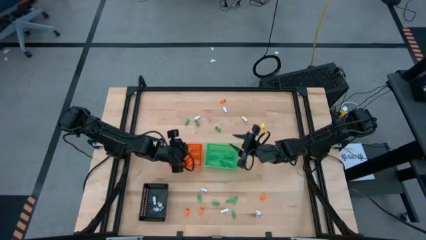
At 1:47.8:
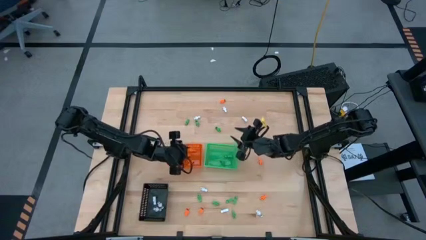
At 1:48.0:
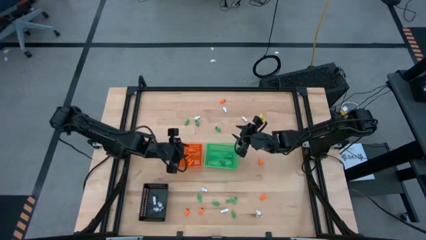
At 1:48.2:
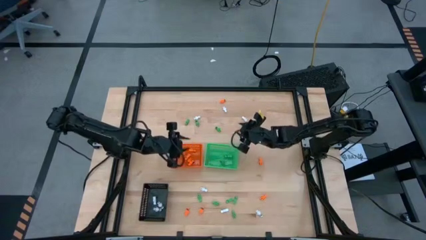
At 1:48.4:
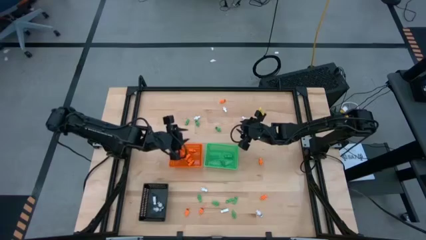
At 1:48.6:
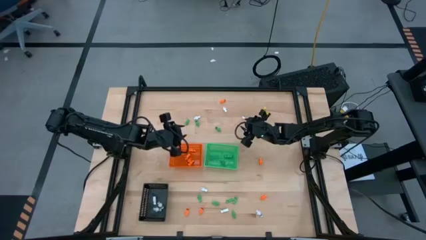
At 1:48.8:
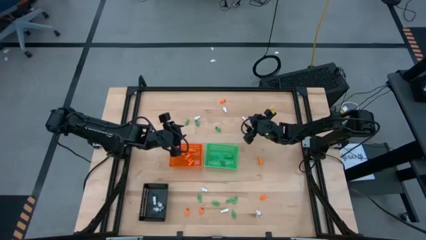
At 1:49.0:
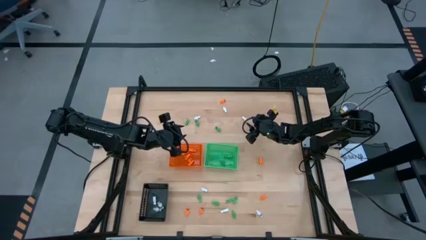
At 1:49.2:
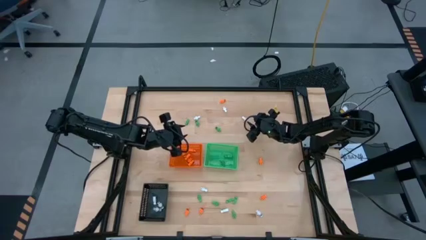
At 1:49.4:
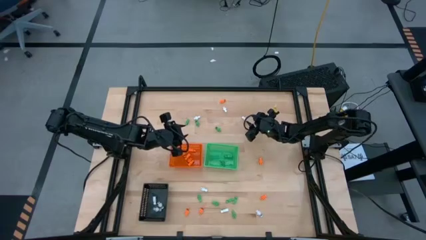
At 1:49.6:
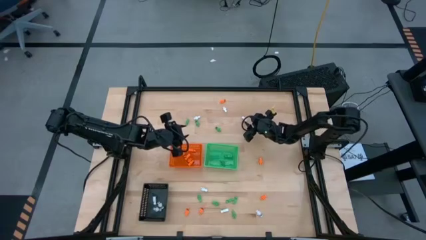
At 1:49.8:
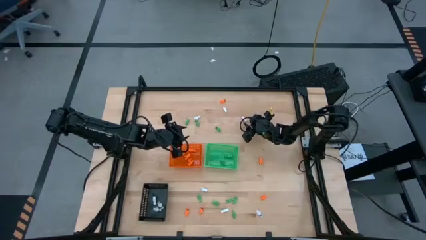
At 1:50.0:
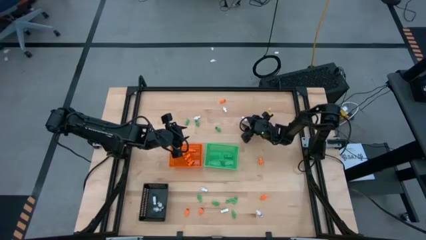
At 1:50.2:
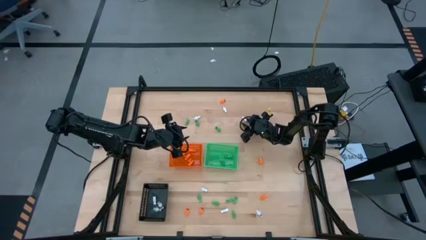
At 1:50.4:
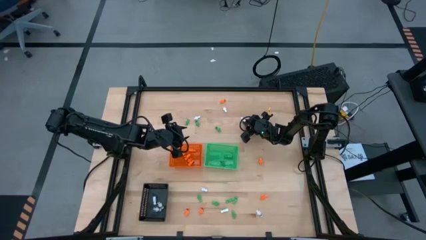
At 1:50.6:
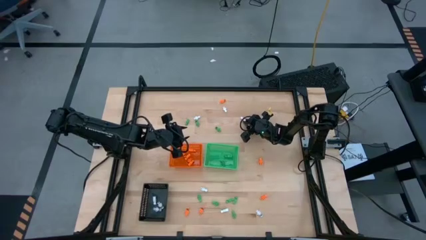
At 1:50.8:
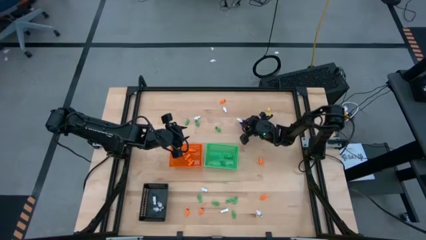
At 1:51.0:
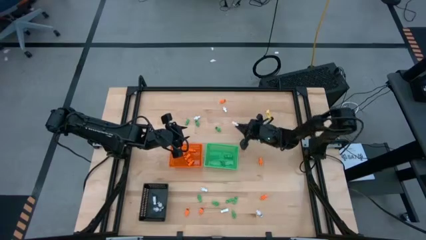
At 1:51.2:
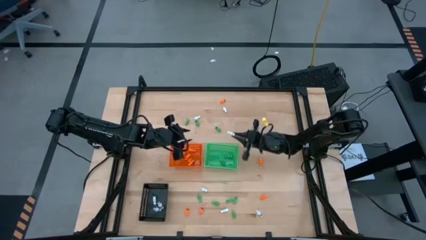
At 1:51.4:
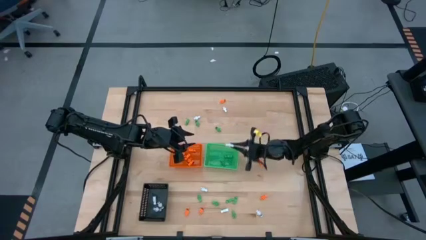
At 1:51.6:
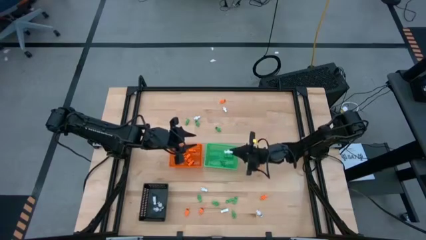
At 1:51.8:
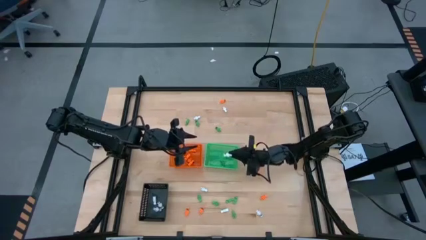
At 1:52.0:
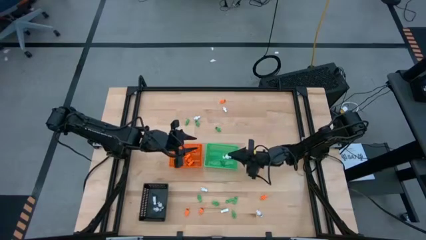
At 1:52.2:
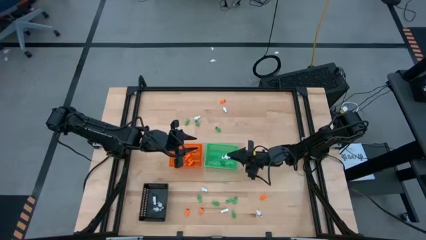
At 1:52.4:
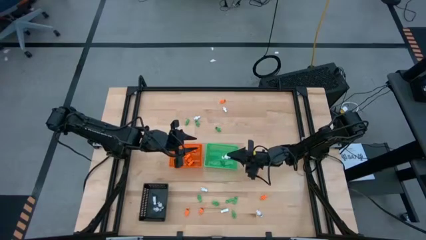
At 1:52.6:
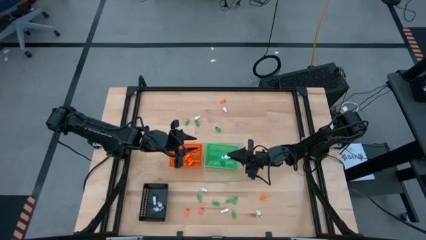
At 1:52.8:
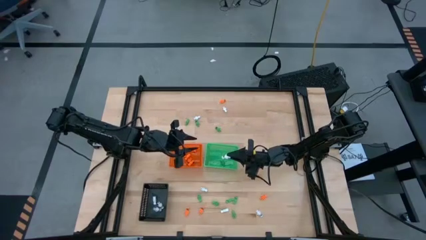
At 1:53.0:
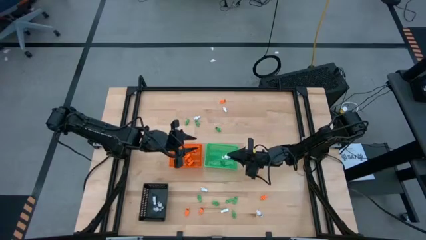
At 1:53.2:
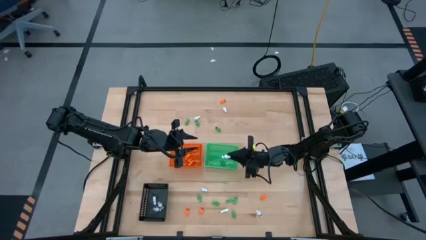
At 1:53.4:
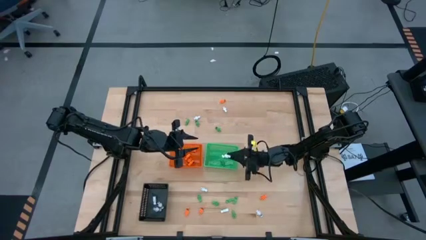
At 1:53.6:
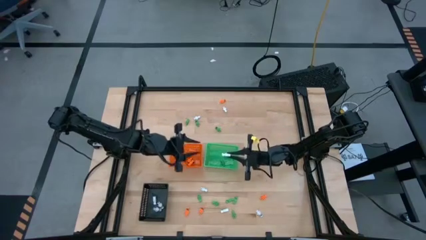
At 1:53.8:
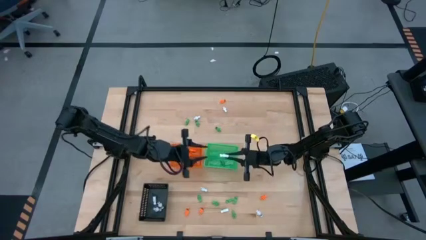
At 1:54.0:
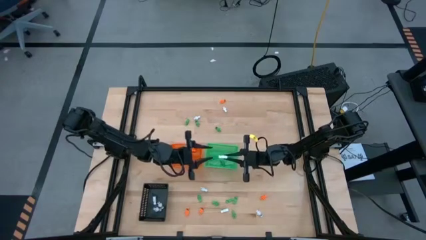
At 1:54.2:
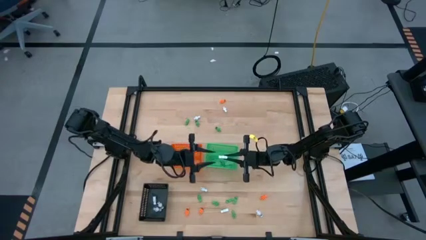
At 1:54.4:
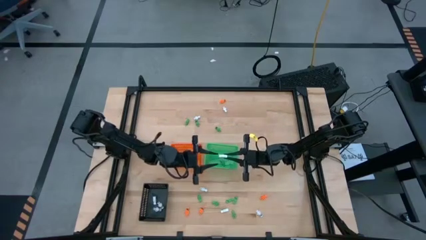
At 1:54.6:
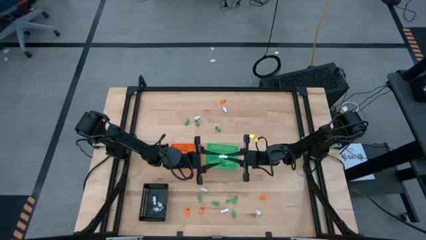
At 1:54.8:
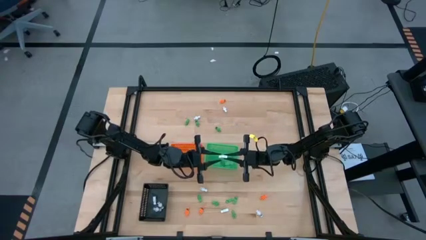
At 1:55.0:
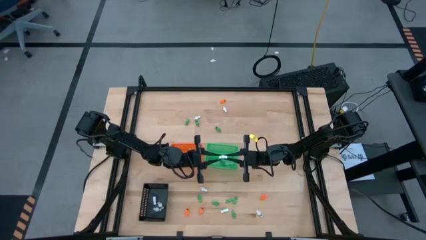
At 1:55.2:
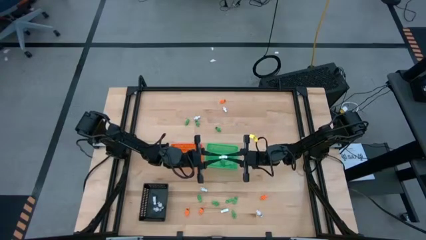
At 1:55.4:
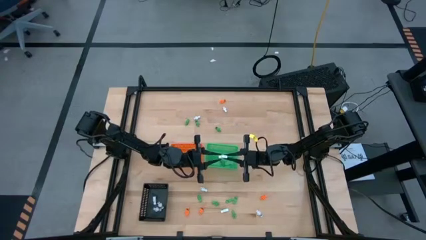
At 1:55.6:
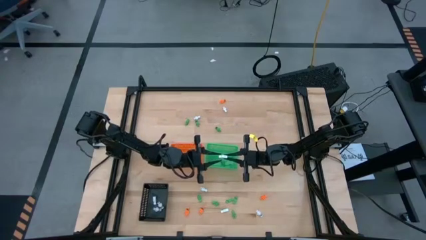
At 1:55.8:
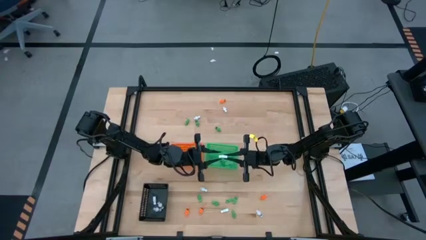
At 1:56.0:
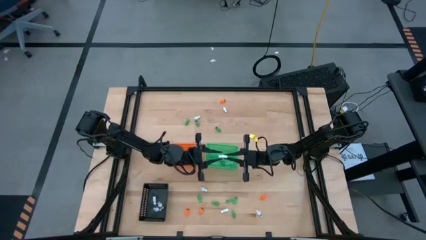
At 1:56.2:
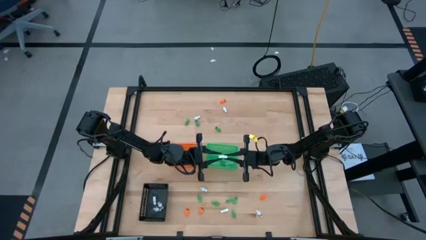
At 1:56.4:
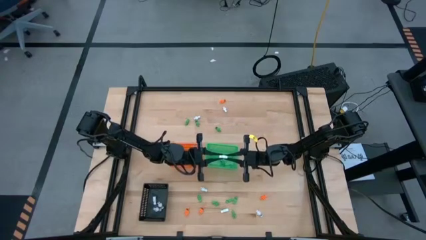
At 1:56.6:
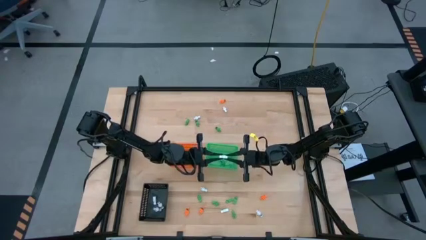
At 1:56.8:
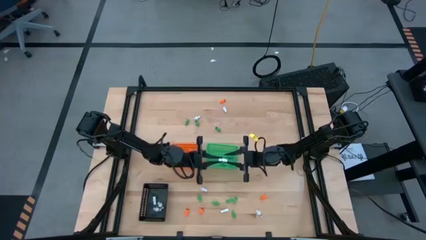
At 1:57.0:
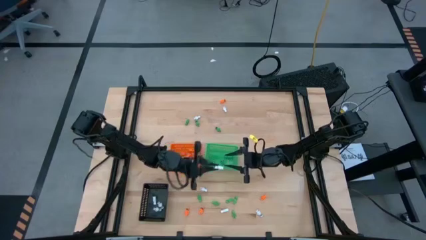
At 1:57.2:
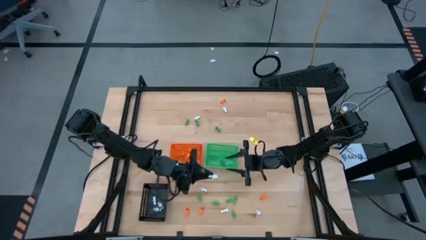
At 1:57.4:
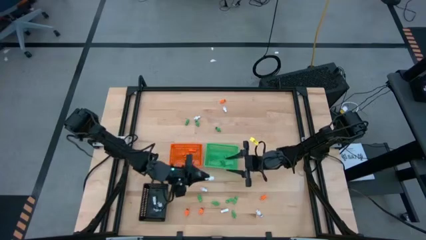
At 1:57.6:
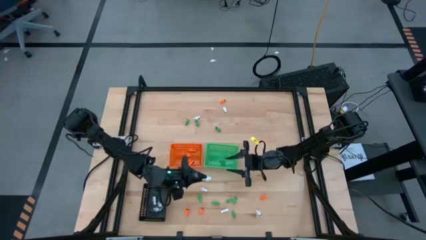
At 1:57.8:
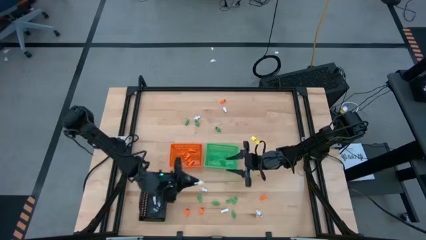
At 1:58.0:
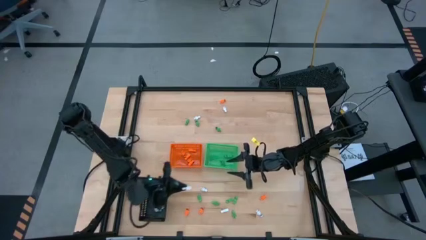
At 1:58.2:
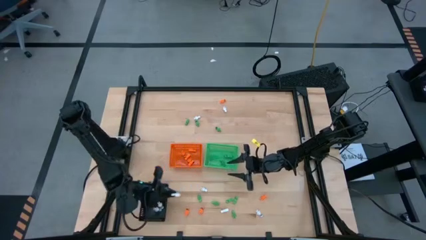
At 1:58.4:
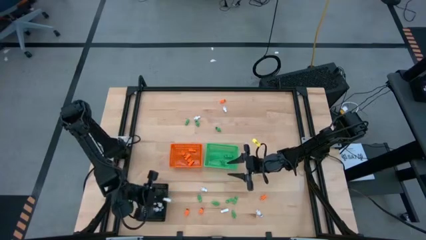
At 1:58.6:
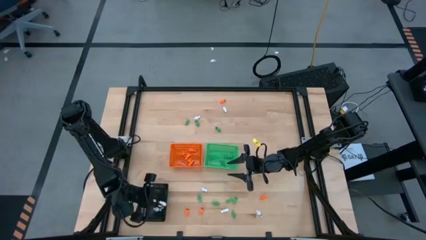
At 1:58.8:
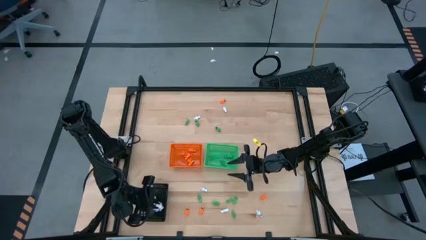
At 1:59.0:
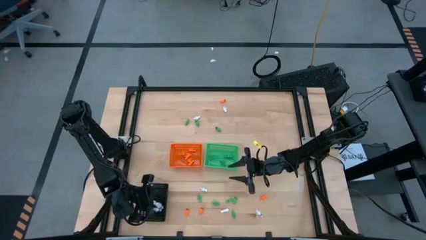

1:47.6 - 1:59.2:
Task: Sort Halloween decoration
Put the white skeleton toy into the black bin

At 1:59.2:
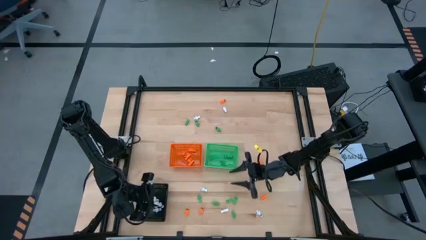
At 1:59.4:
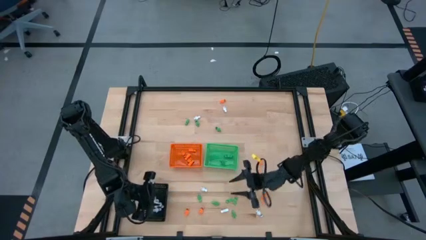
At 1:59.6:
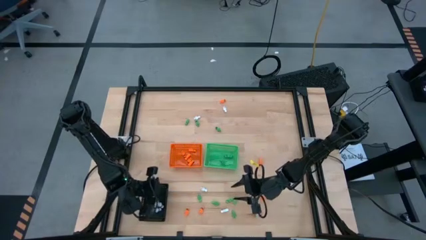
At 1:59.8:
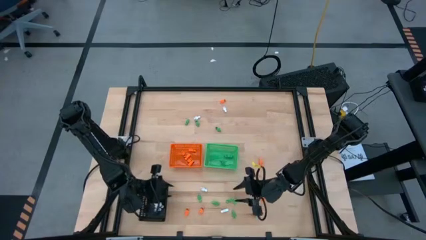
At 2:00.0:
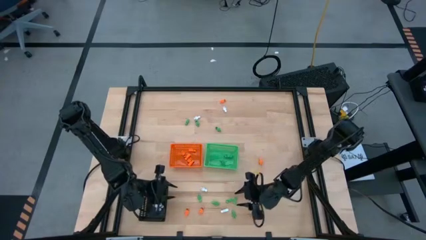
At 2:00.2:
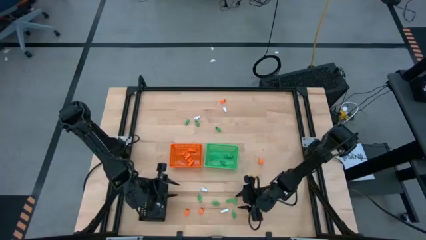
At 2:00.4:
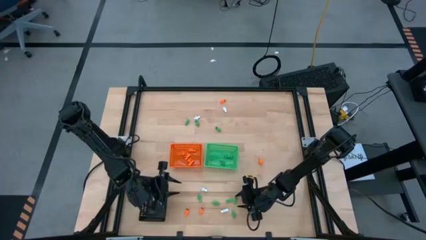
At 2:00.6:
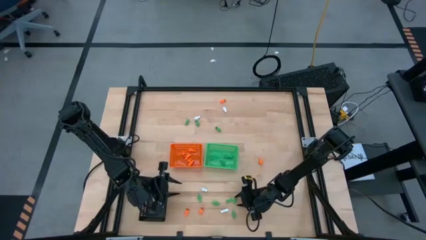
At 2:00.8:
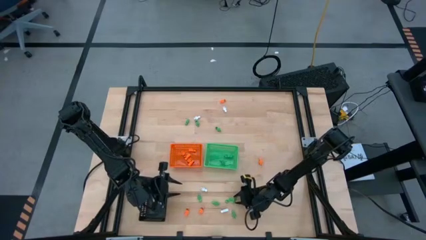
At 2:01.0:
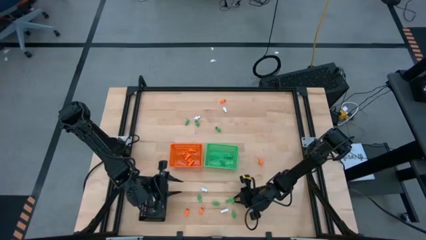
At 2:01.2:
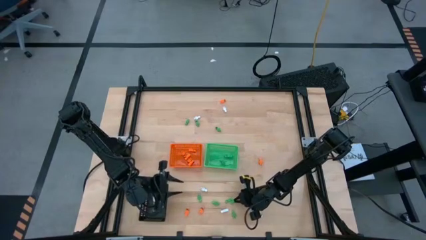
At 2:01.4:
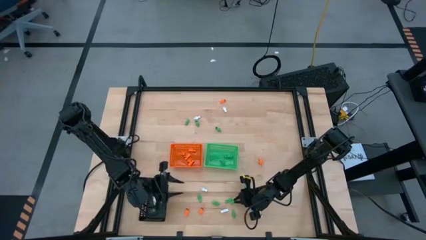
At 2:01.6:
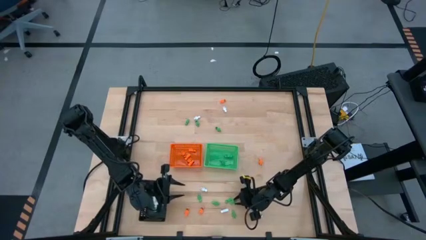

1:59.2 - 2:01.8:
Put the green skeleton toy into the green bin
